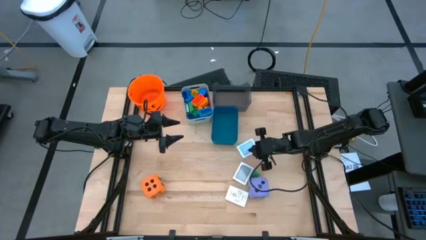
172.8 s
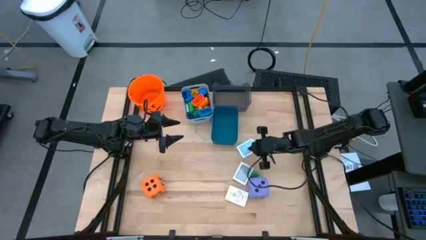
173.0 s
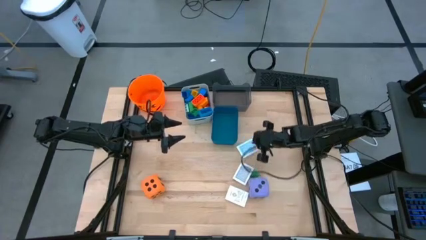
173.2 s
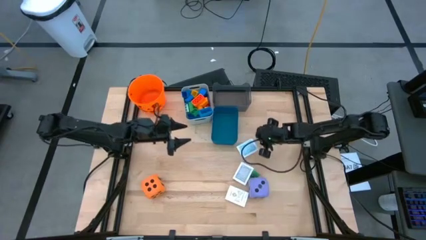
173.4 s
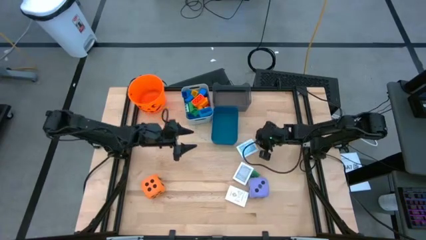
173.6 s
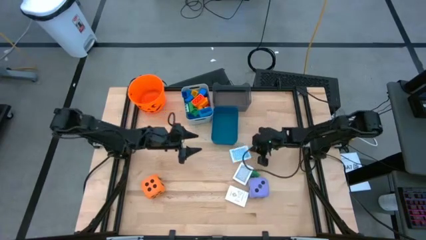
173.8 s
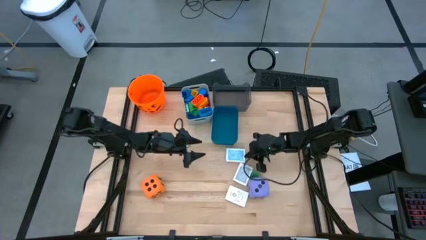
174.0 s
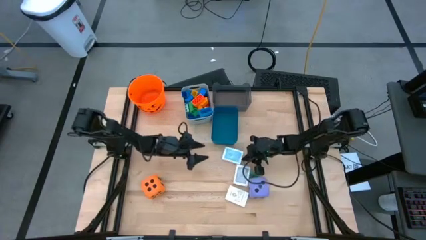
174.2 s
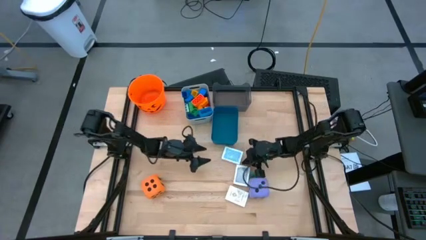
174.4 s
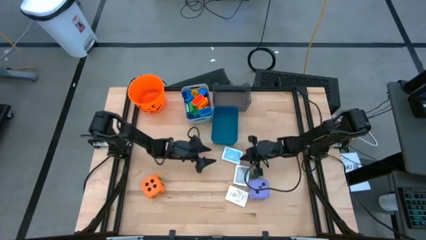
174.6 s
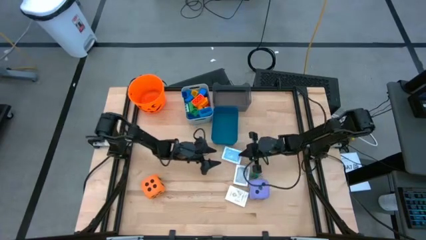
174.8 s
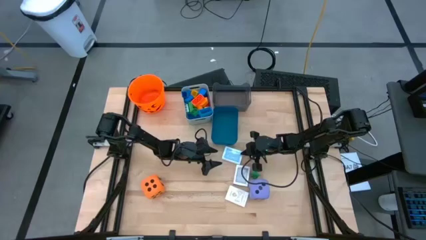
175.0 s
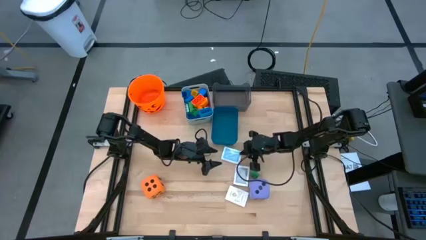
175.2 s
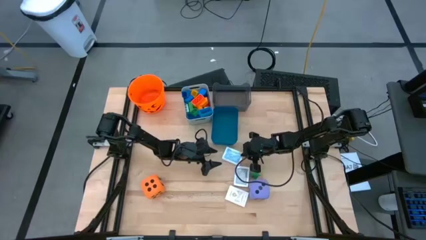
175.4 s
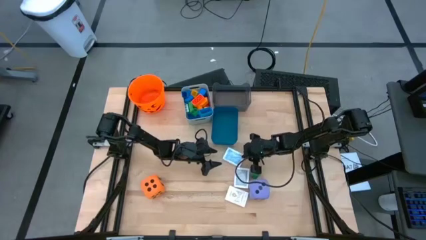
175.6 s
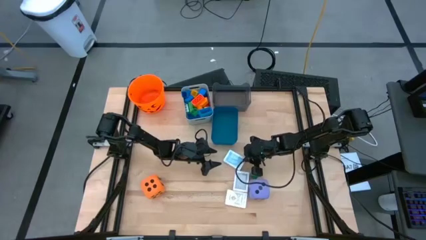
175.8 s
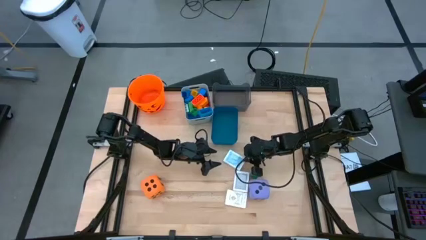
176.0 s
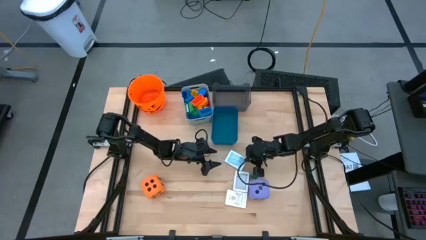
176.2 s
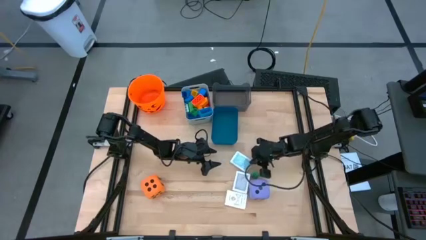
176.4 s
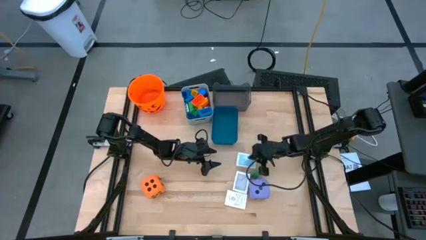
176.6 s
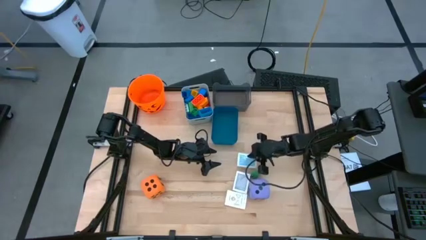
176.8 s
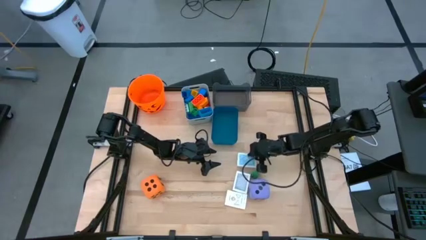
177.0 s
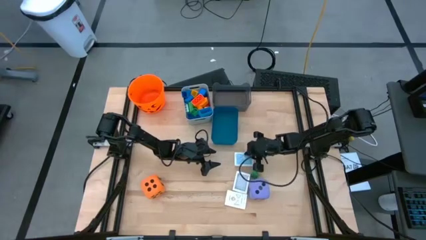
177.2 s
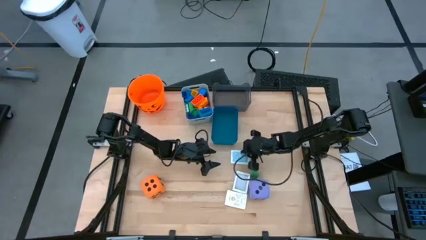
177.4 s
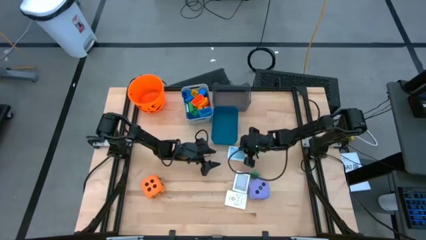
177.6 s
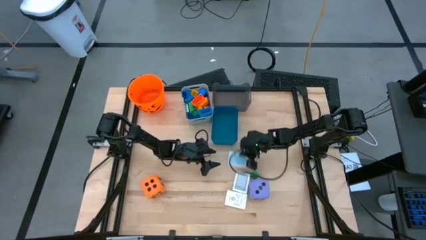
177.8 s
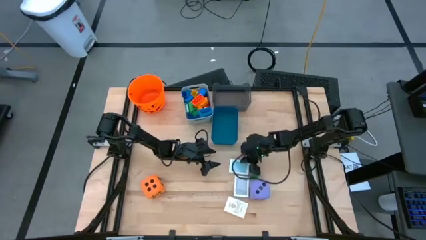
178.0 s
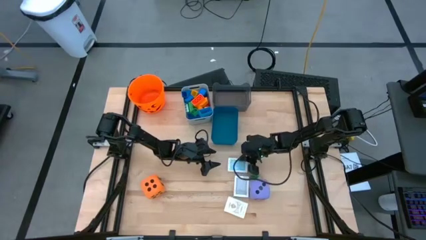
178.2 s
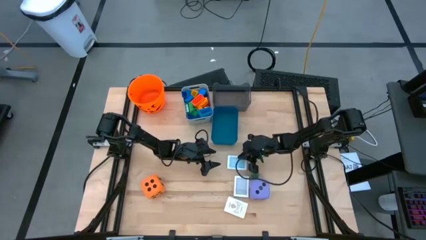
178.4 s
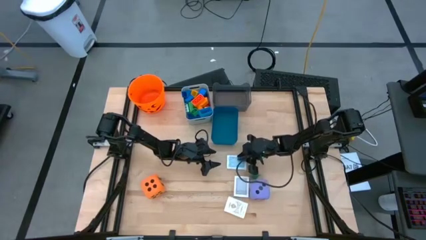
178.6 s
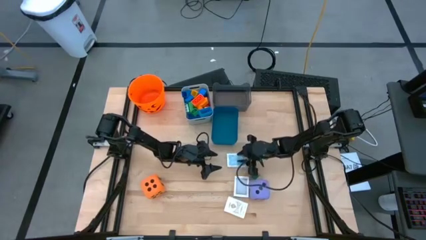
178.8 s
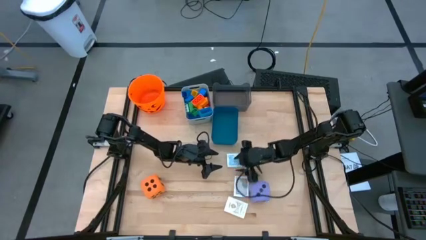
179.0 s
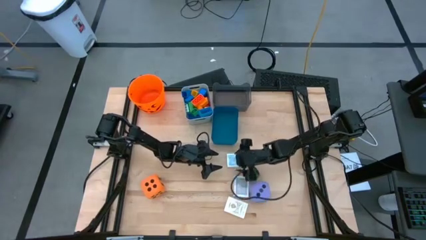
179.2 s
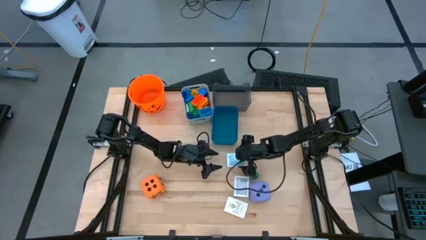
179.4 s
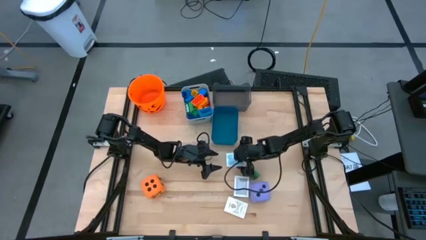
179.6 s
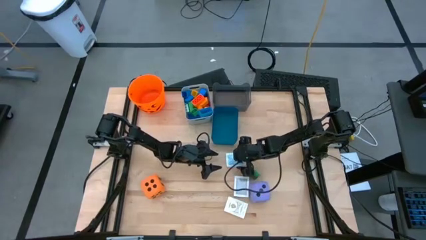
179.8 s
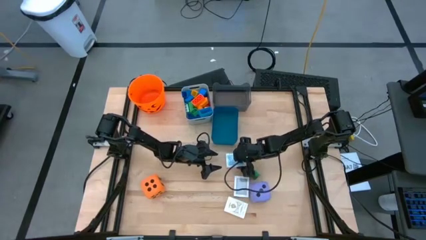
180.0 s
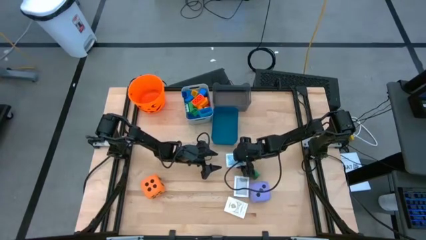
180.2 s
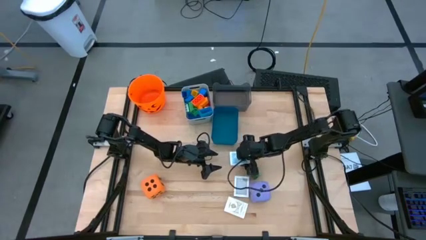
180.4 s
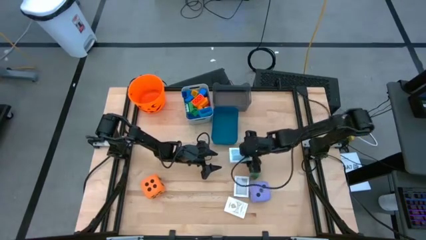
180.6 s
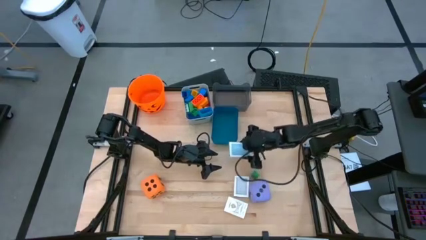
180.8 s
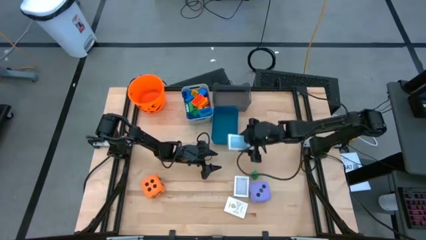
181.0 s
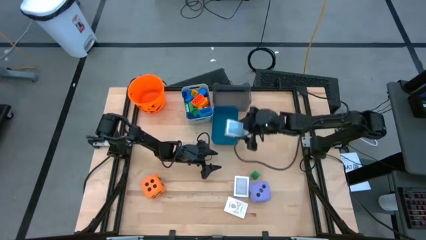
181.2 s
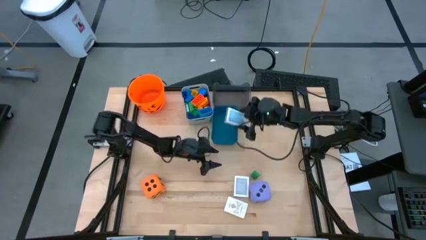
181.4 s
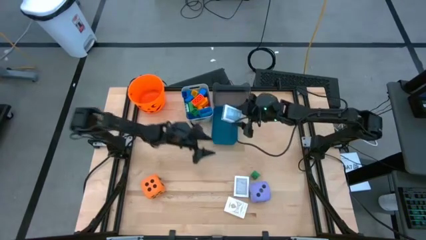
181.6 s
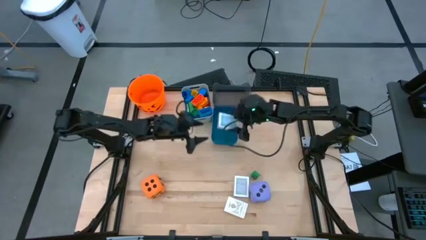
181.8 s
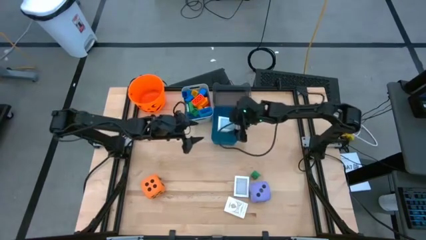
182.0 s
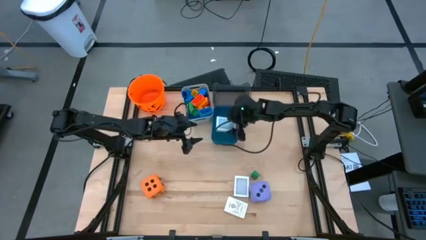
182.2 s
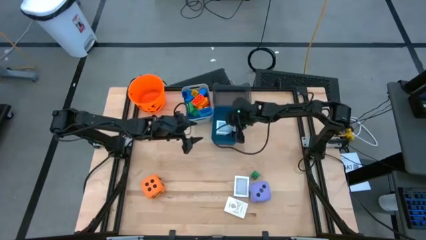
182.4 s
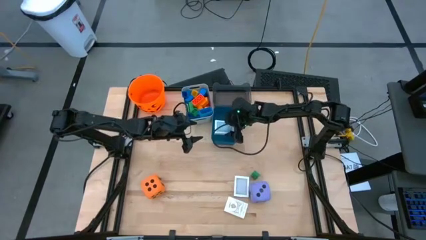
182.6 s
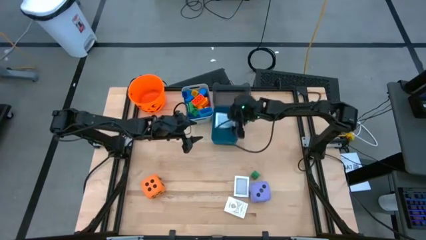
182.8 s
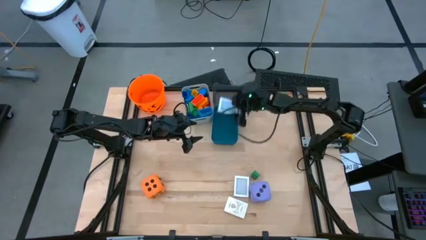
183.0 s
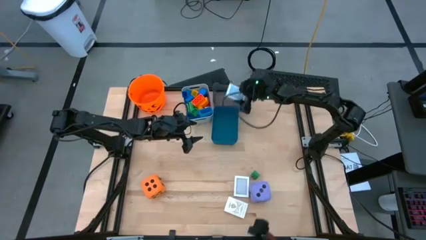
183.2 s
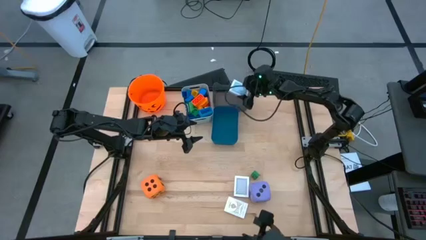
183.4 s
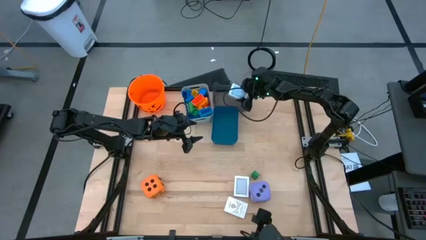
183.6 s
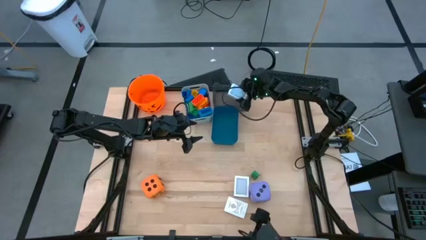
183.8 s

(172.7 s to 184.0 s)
Task: Pick & Place Toys
Put the white and blue deck of cards into the black bin

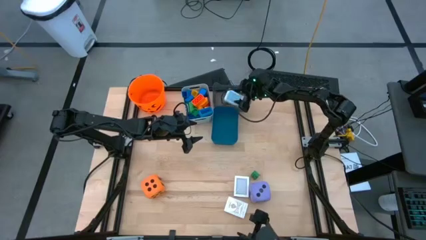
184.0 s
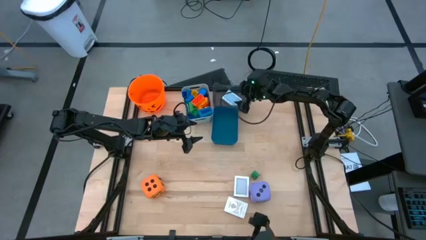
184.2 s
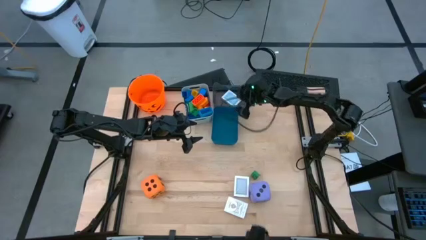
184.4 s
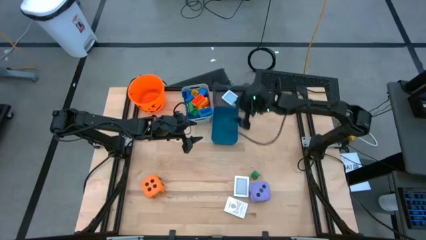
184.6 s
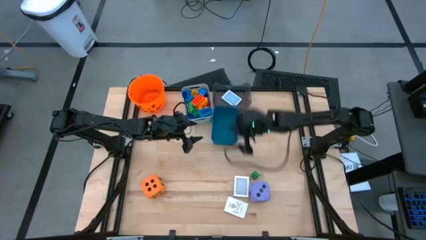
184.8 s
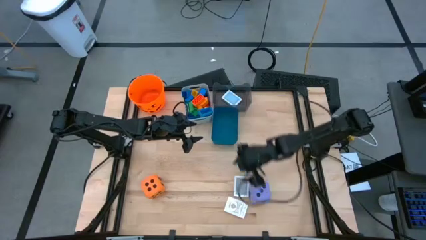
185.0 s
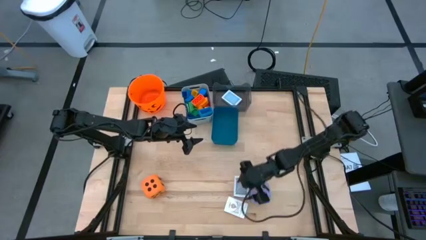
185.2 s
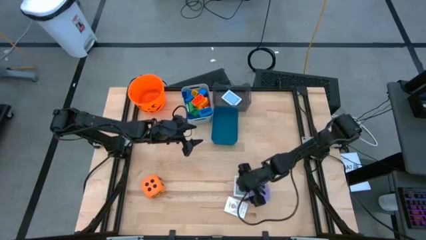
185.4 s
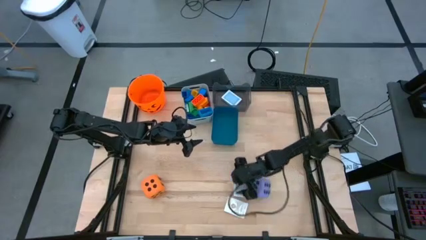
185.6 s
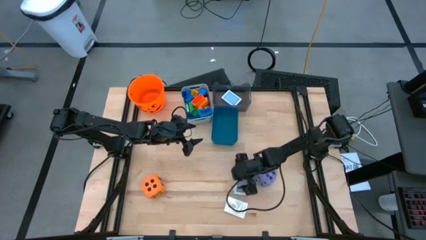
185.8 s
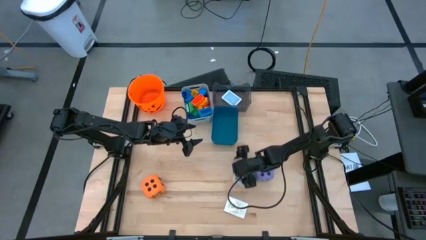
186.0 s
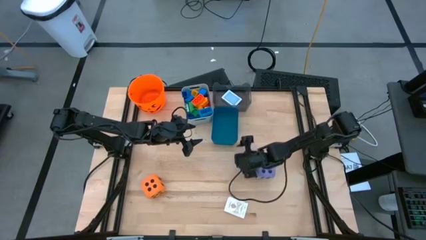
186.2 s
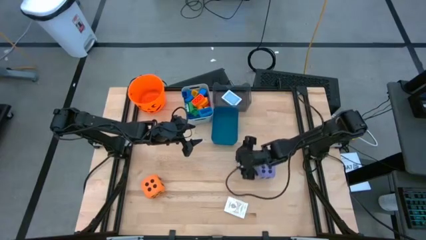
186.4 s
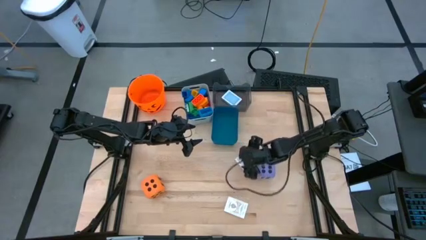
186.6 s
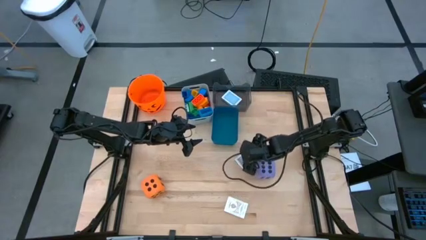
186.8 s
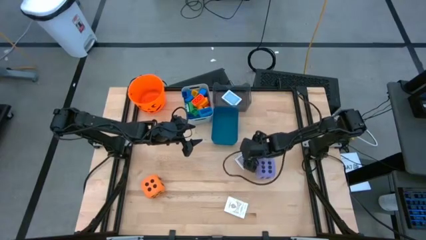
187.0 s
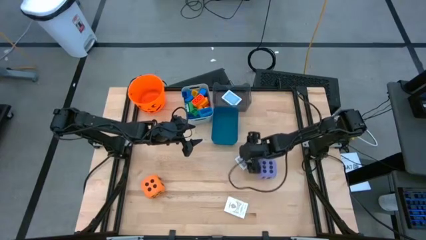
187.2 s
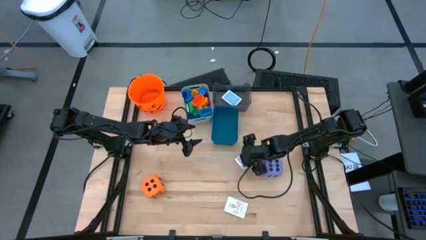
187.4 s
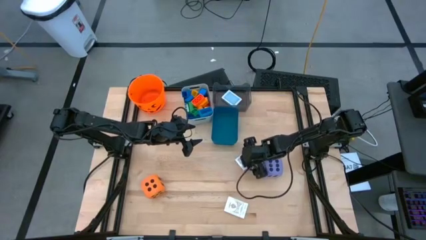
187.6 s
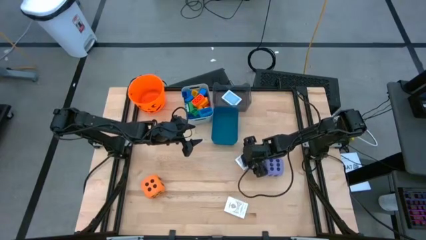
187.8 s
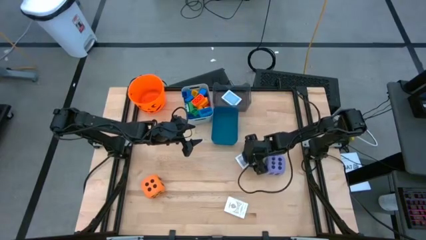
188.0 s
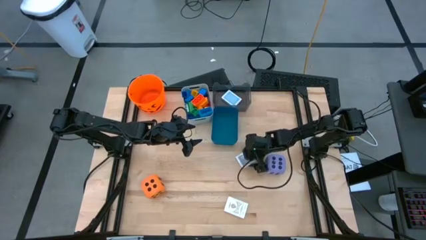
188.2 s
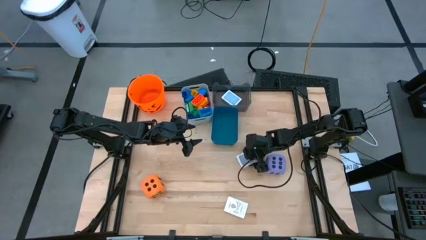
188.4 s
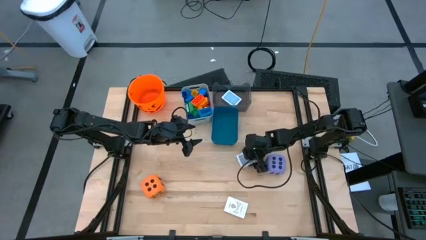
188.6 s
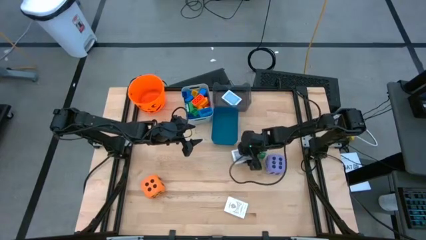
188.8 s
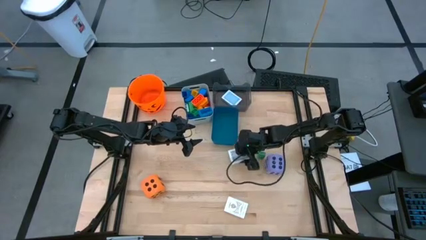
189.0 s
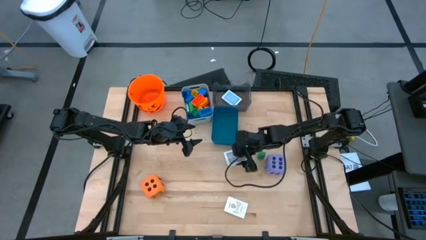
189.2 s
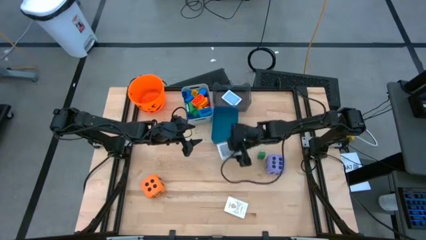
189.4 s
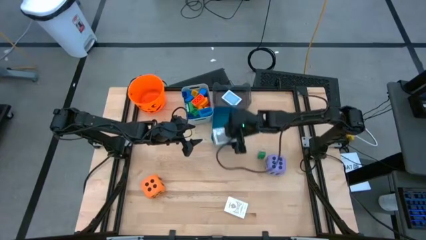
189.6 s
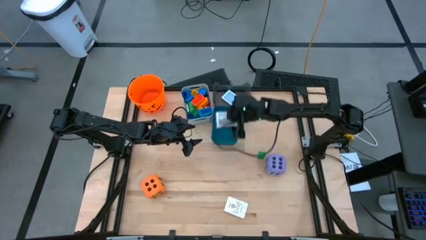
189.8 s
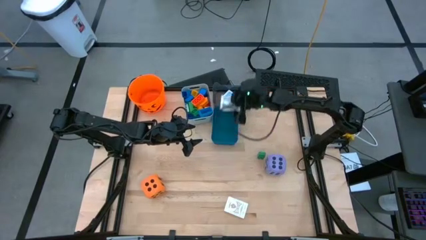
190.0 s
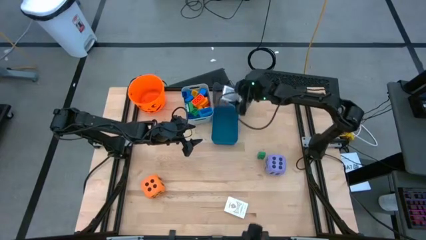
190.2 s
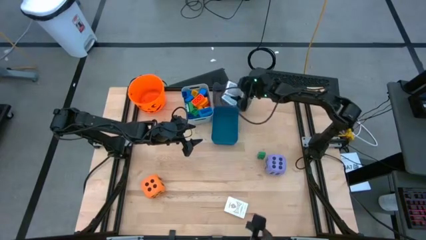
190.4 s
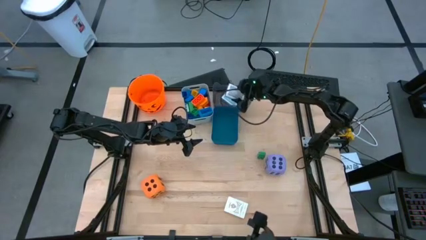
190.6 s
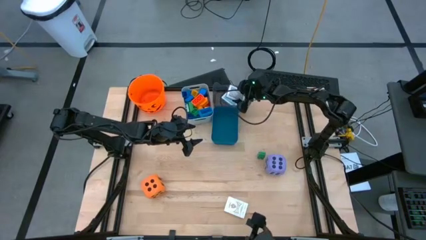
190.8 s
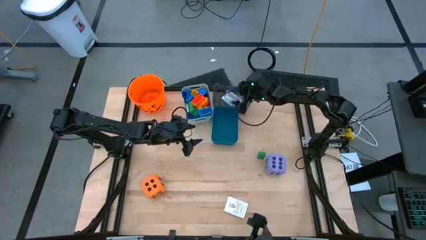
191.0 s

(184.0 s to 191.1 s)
Put the white and black deck of cards into the black bin
